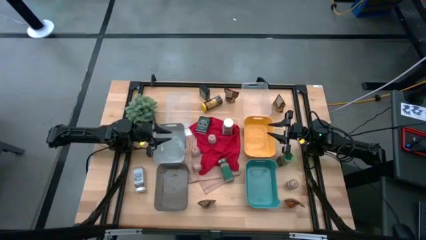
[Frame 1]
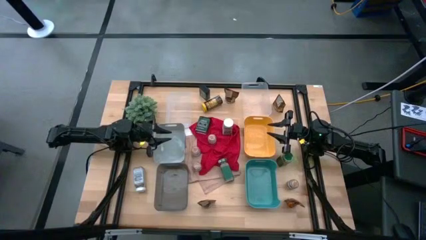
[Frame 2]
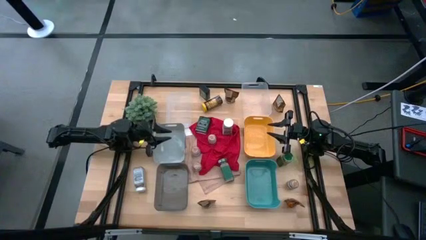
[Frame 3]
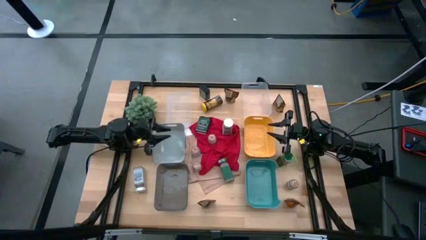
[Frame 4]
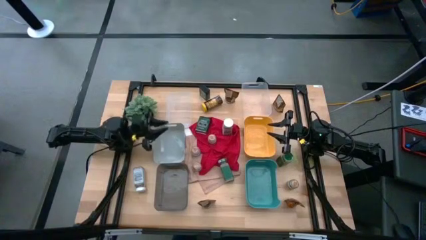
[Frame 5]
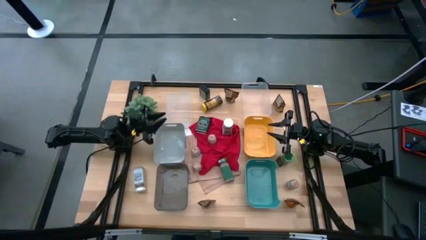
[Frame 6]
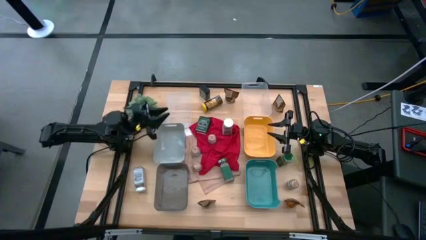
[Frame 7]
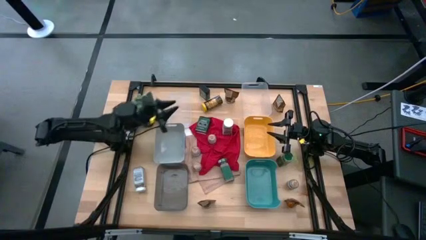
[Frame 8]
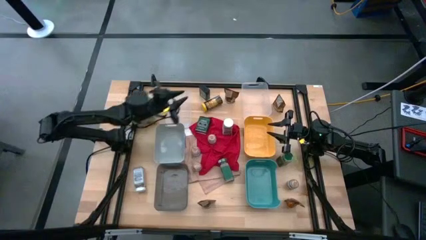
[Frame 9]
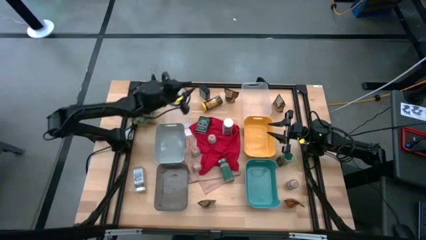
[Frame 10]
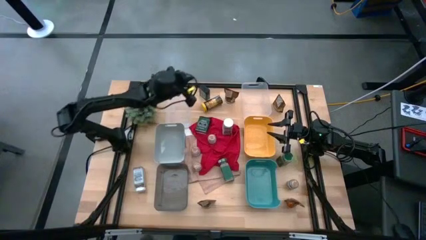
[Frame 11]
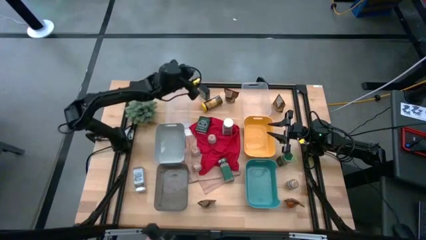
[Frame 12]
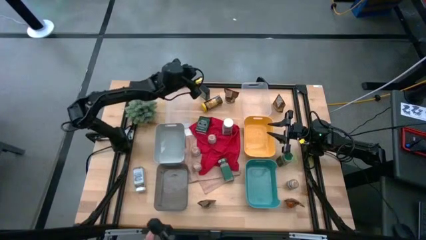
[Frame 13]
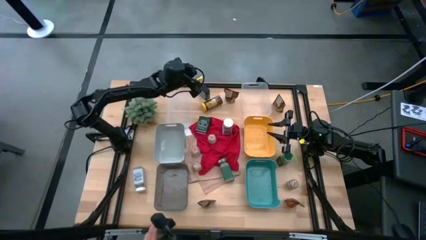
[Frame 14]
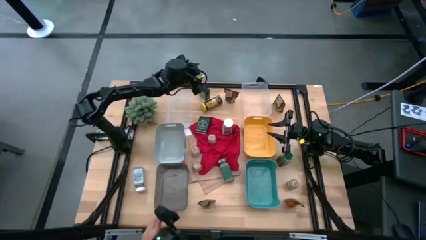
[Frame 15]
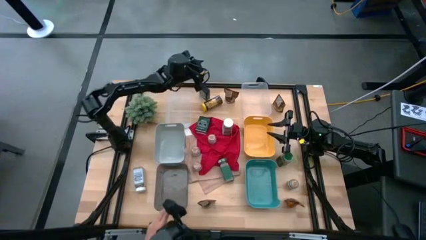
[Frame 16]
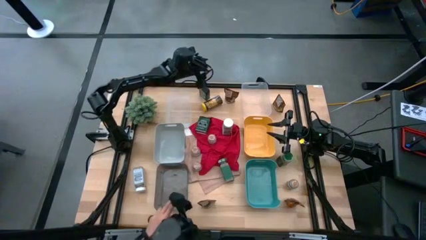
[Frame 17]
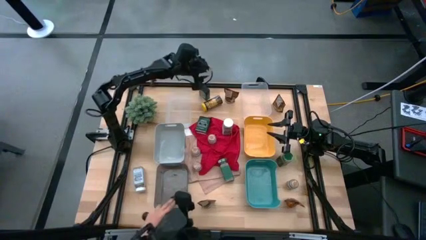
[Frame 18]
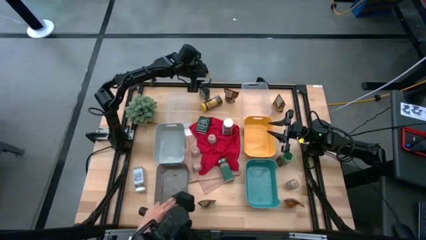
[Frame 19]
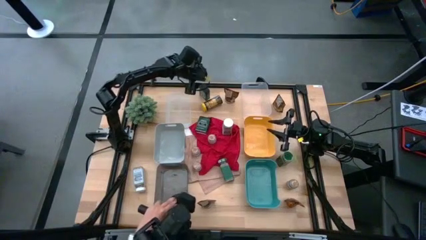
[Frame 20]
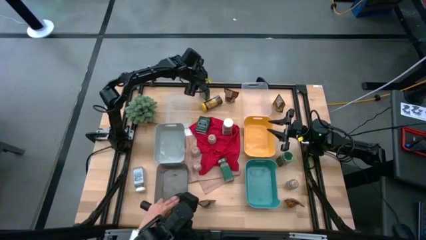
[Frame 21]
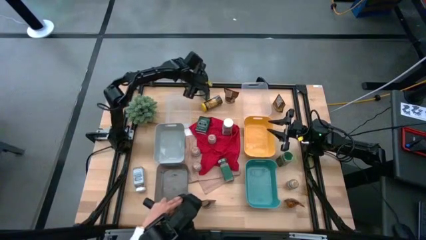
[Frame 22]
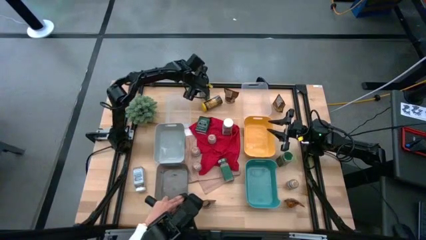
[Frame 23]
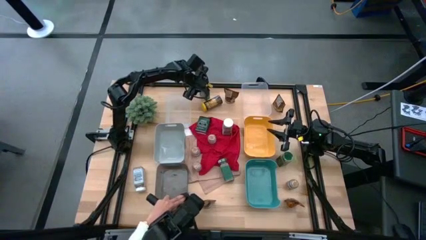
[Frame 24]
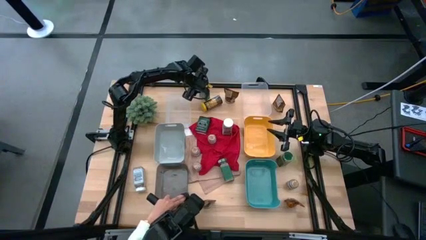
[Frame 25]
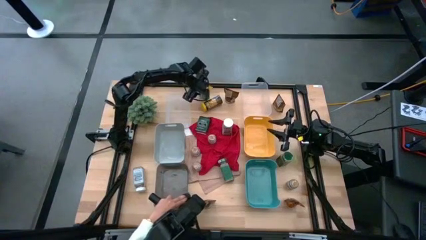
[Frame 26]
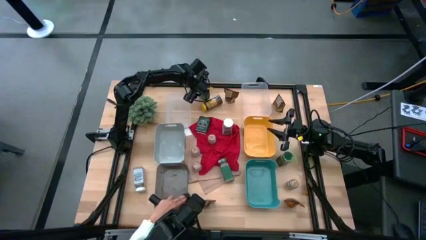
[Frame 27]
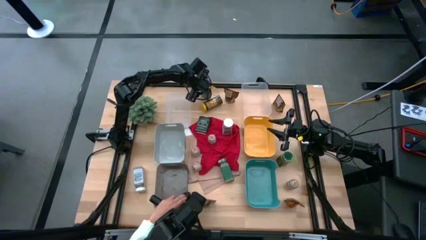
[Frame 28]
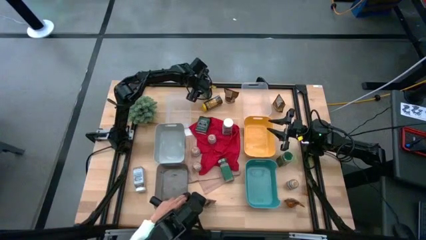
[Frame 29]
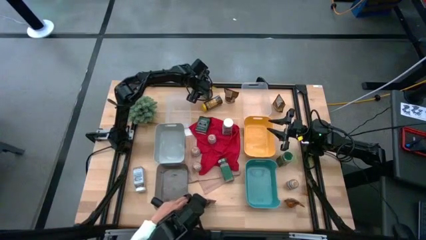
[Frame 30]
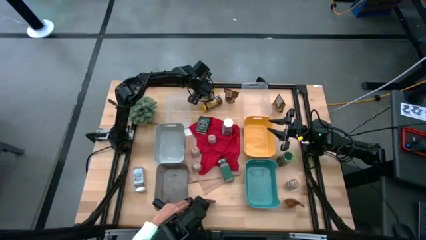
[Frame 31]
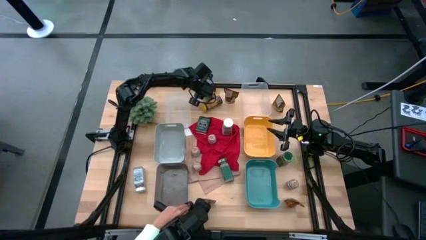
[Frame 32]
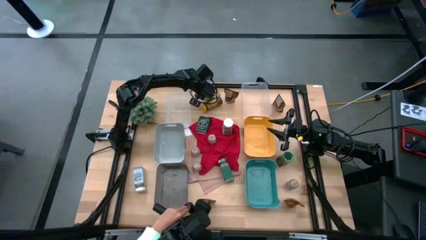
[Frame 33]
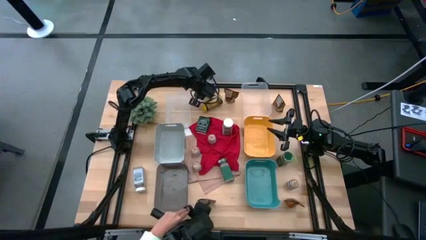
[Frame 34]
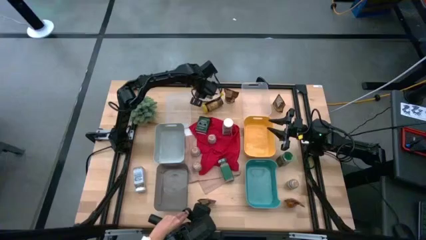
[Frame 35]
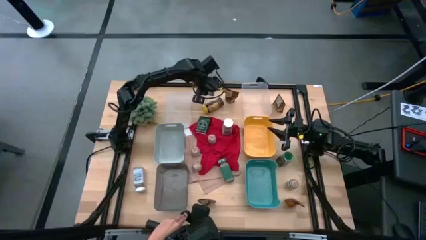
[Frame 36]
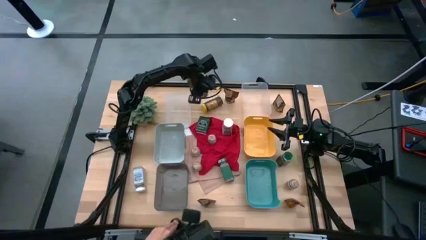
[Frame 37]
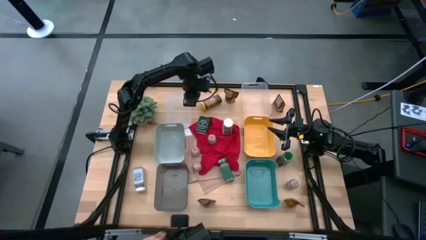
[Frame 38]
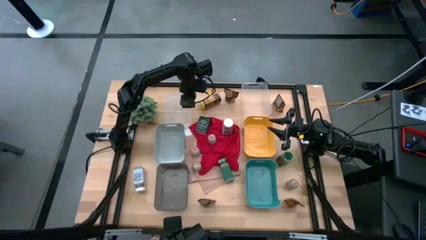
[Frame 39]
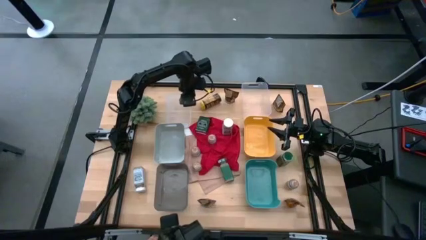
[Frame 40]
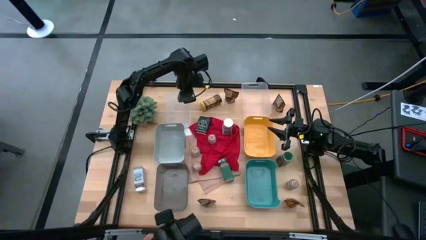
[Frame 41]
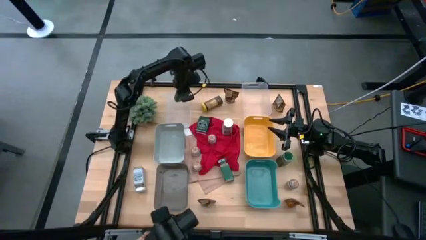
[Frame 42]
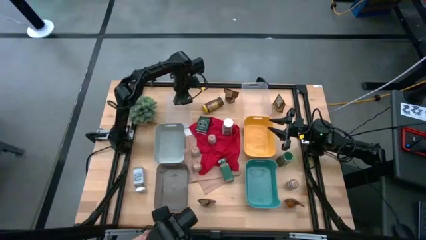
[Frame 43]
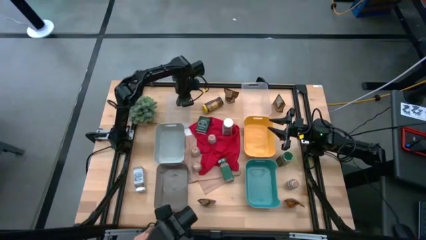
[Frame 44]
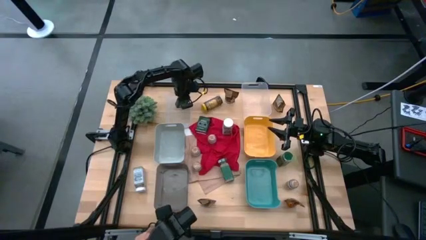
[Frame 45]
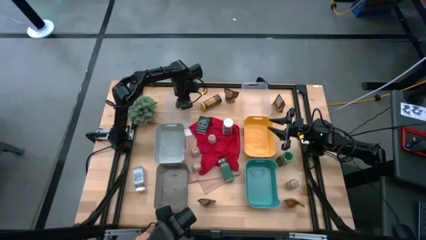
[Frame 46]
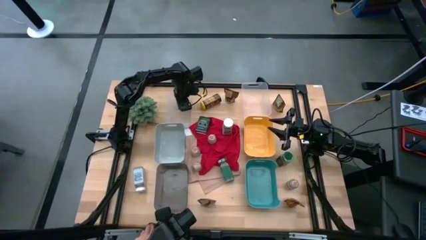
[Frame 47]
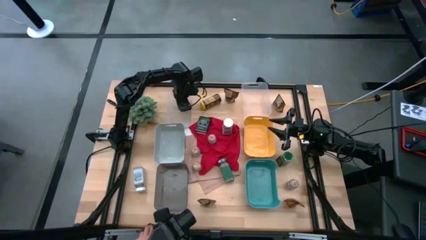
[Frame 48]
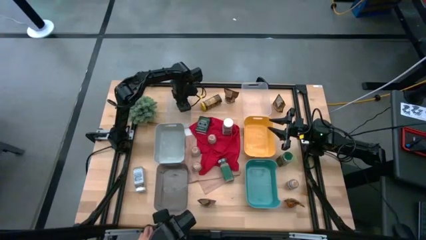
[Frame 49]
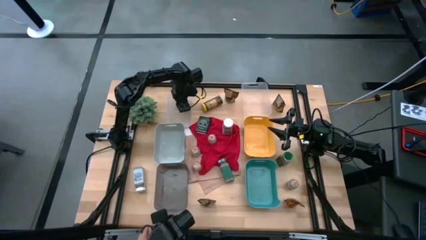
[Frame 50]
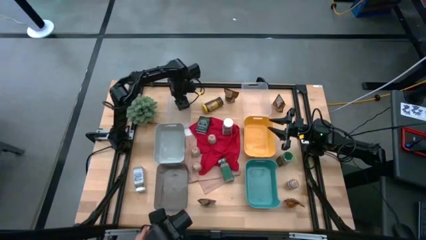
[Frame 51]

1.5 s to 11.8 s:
Task: Sort spices by type
Put the top black seasoning can into the left transparent bin

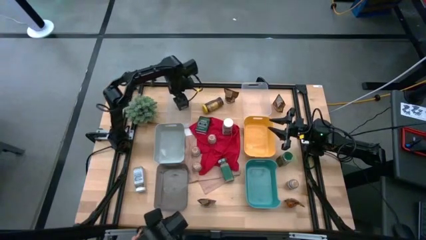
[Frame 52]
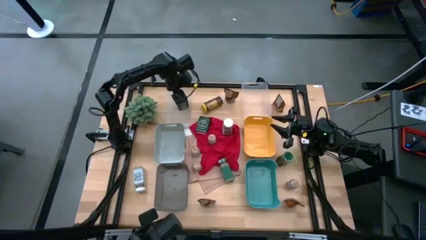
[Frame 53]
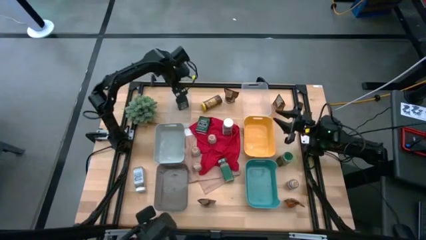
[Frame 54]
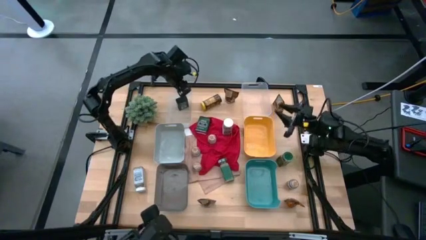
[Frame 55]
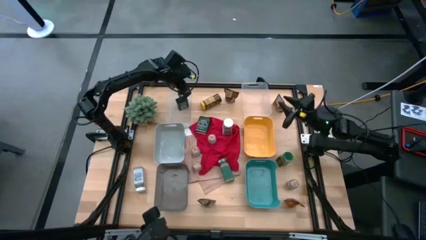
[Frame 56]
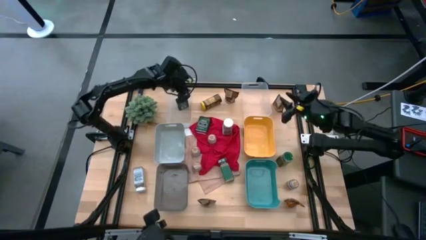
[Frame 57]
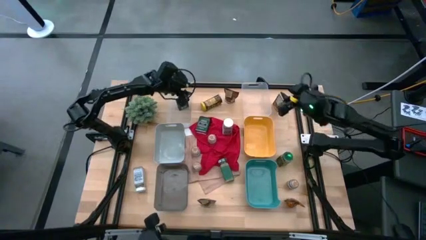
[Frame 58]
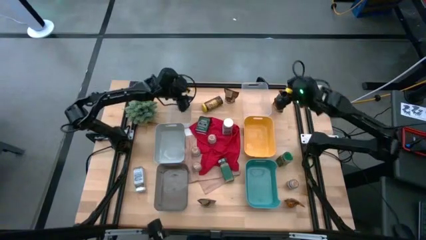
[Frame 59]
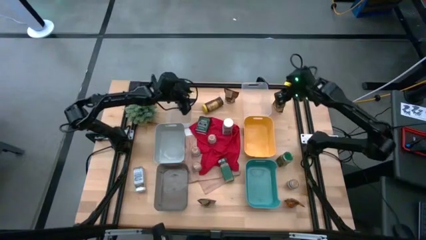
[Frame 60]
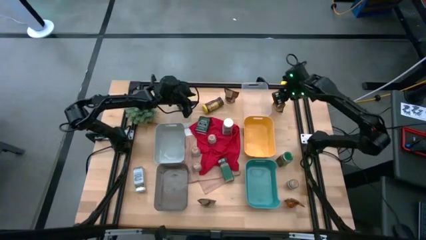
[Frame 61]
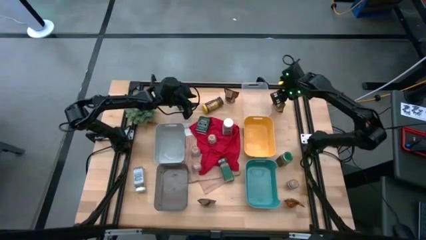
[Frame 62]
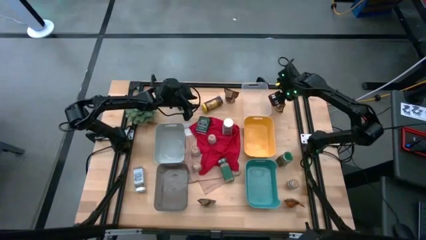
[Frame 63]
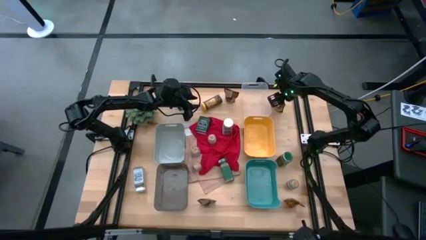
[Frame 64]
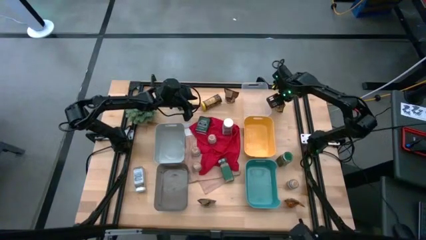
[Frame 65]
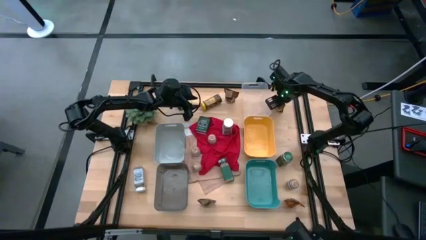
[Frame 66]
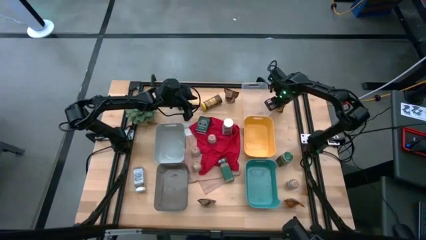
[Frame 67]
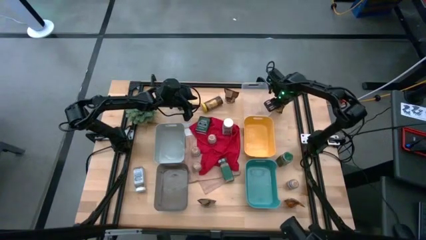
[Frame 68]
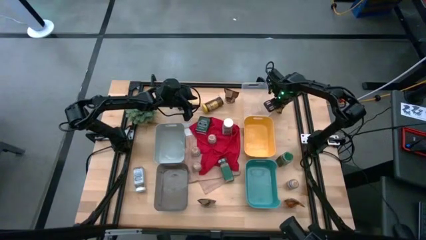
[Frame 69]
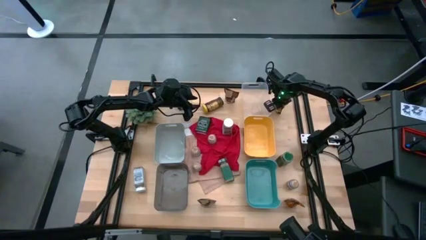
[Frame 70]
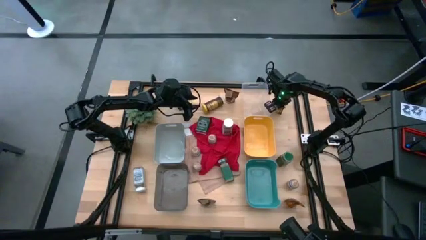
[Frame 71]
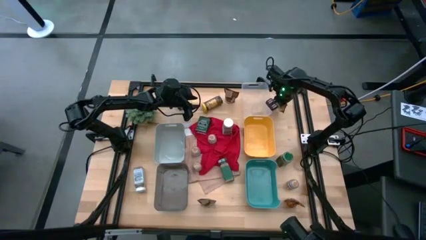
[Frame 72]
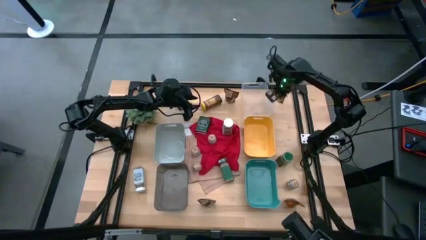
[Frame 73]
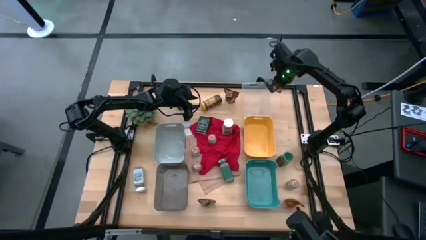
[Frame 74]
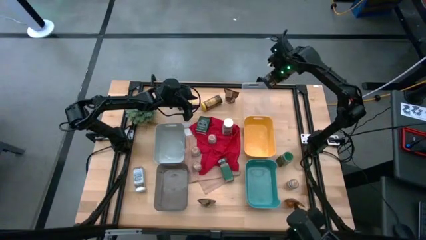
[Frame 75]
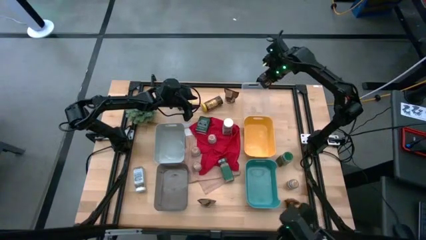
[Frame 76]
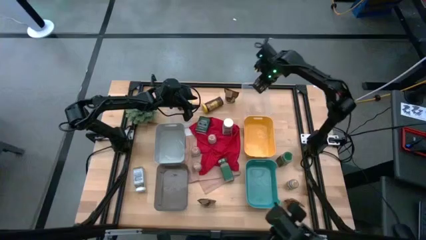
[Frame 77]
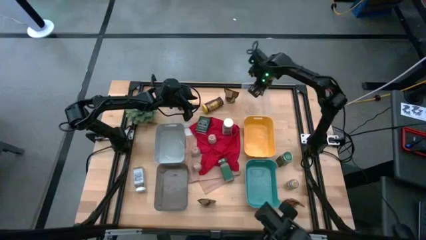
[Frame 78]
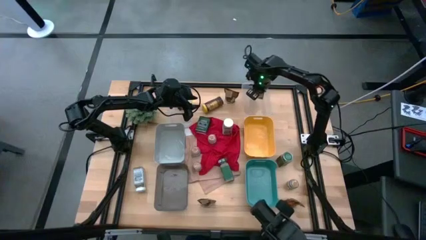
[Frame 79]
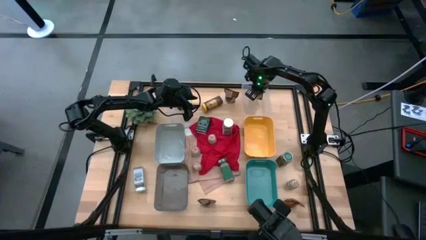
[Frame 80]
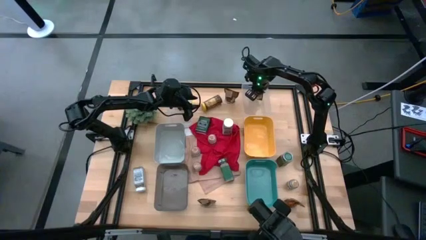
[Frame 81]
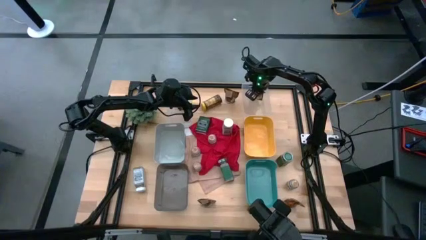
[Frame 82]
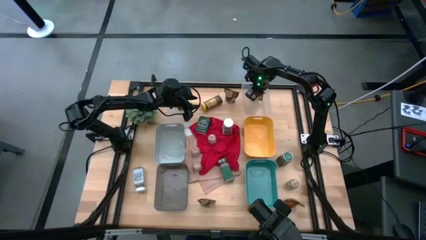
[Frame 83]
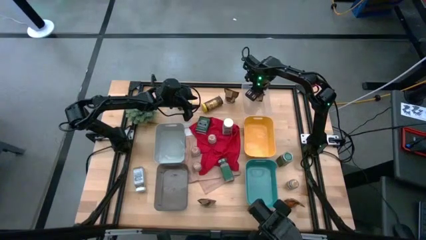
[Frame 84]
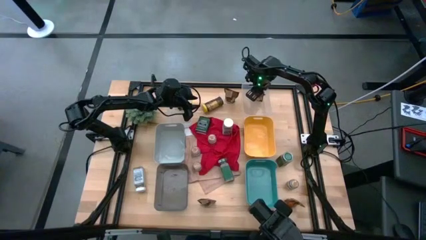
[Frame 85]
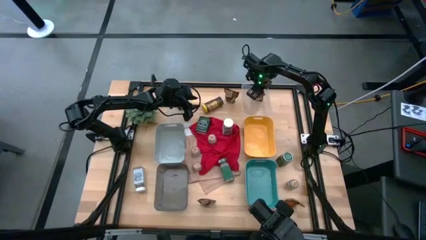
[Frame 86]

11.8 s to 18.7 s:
Put the top right orange seasoning bag into the right transparent bin
